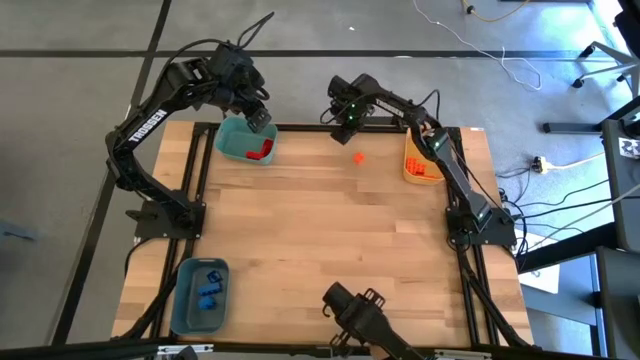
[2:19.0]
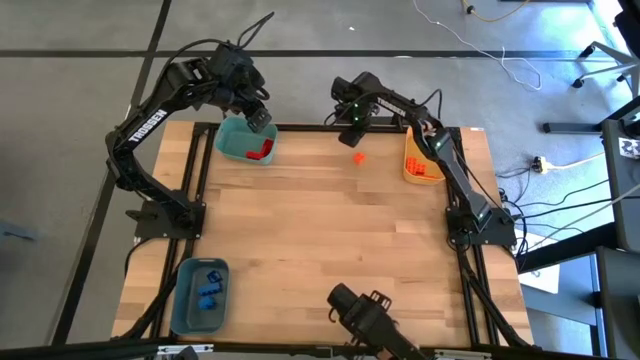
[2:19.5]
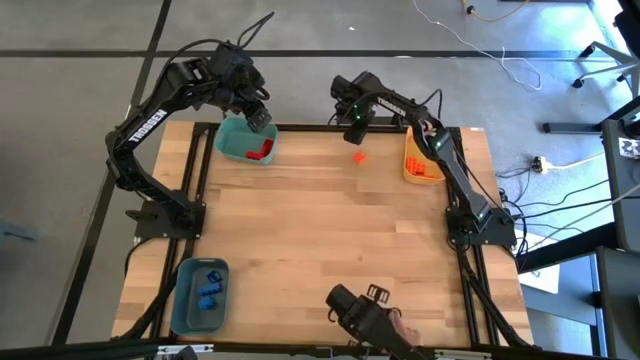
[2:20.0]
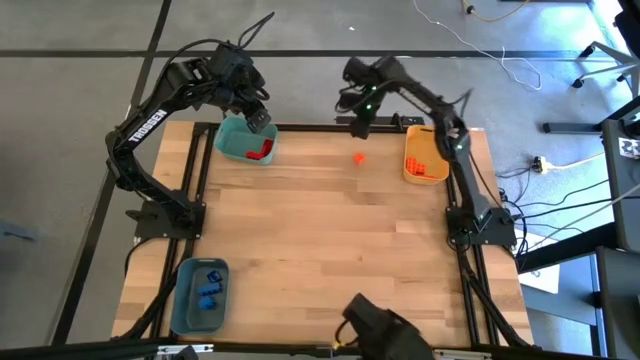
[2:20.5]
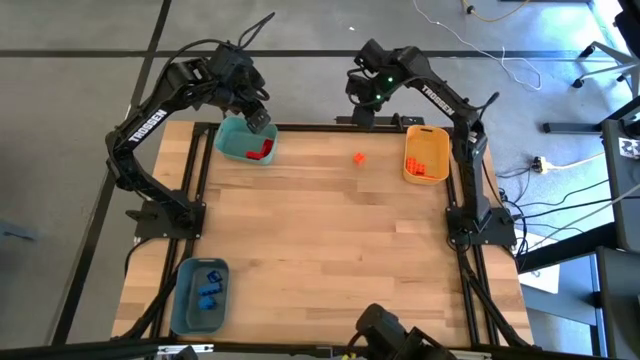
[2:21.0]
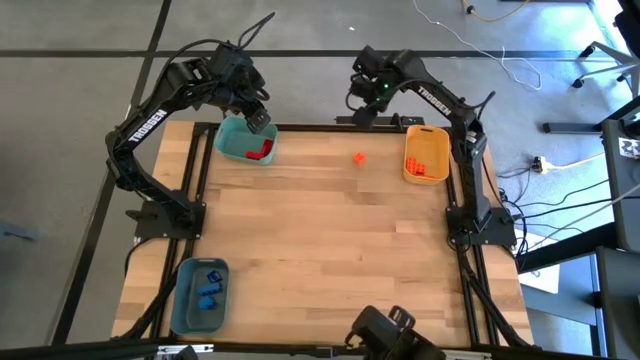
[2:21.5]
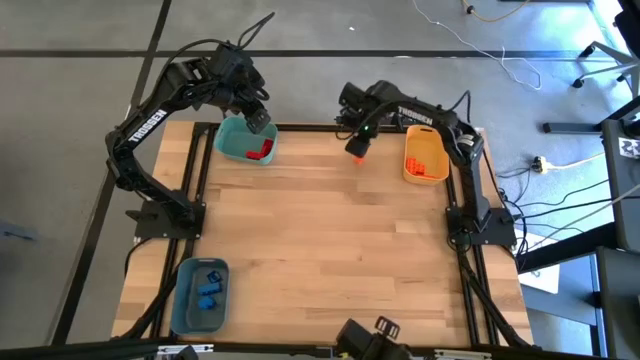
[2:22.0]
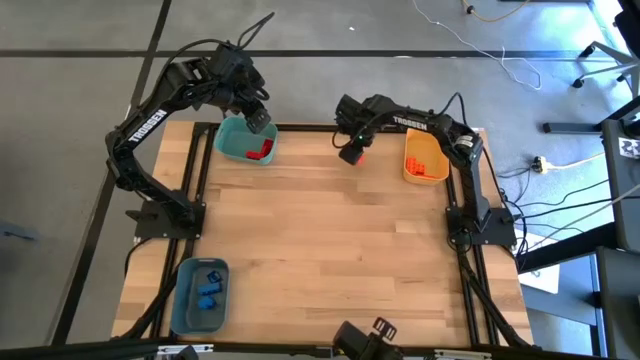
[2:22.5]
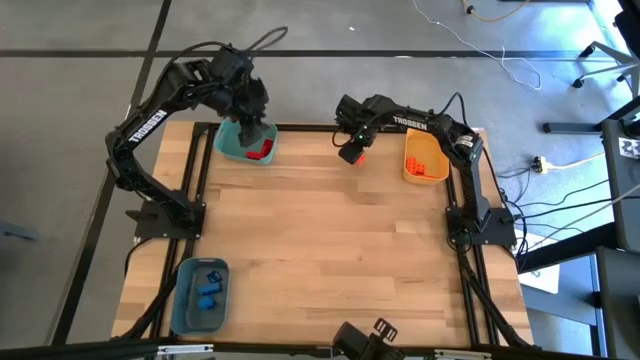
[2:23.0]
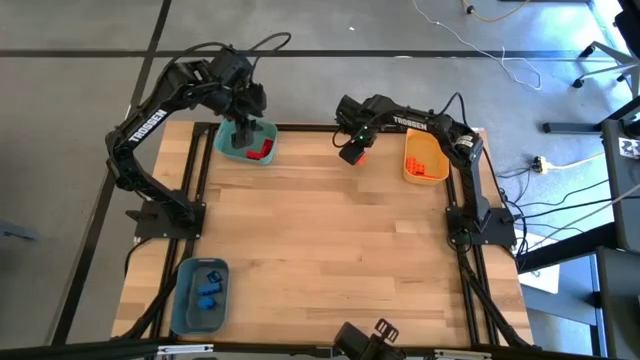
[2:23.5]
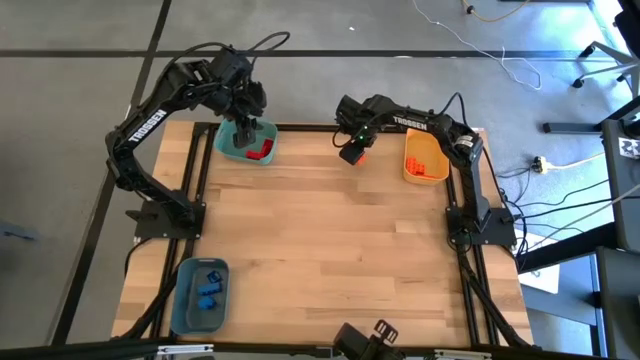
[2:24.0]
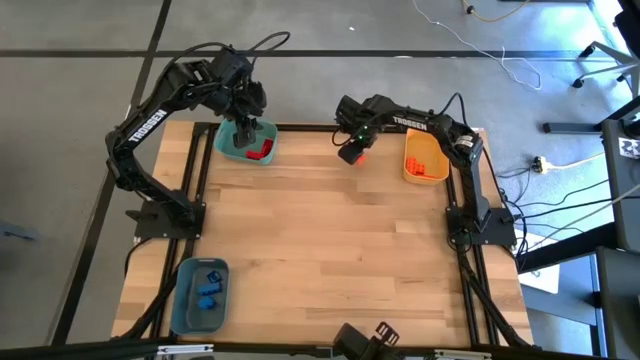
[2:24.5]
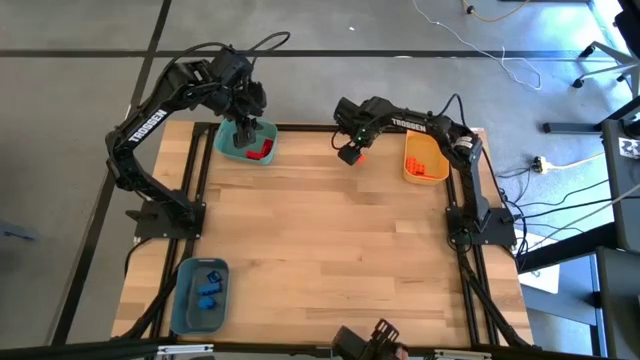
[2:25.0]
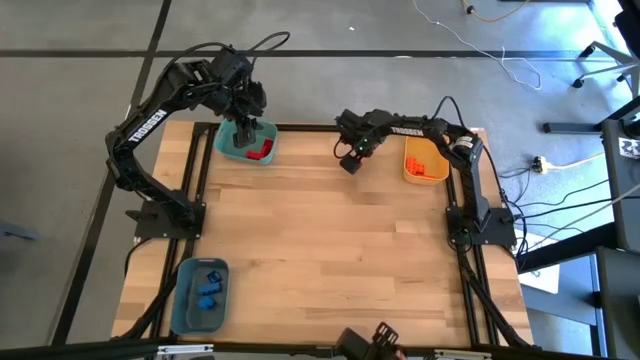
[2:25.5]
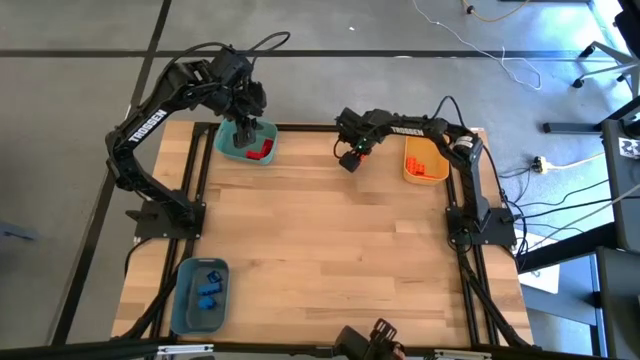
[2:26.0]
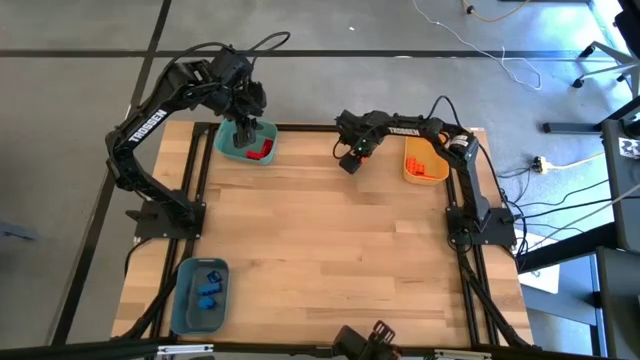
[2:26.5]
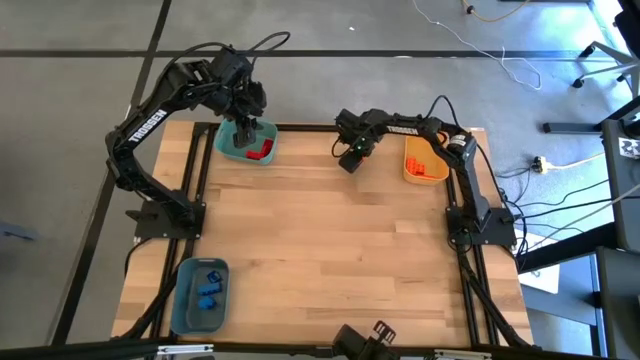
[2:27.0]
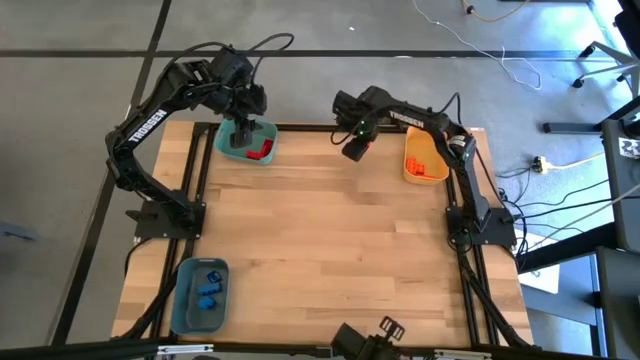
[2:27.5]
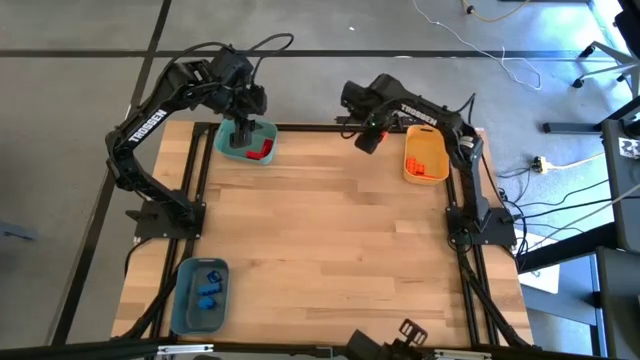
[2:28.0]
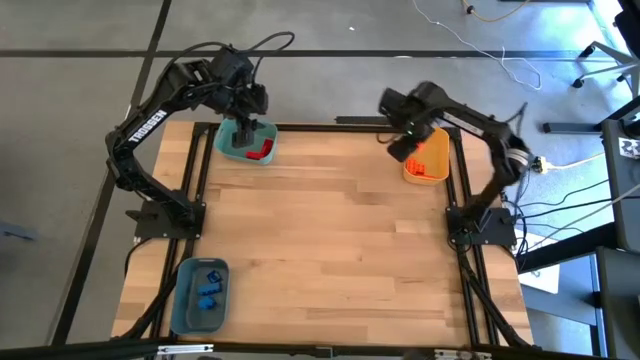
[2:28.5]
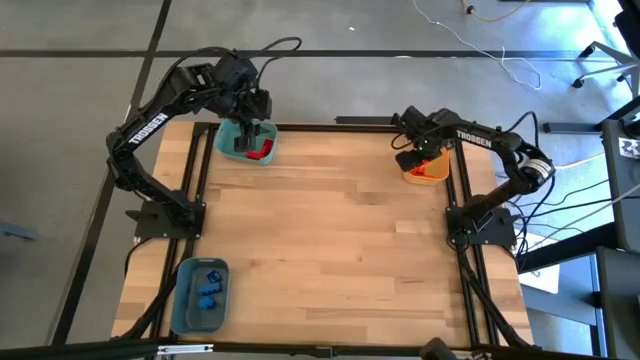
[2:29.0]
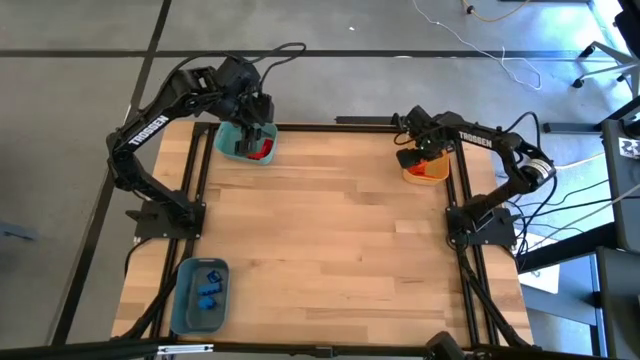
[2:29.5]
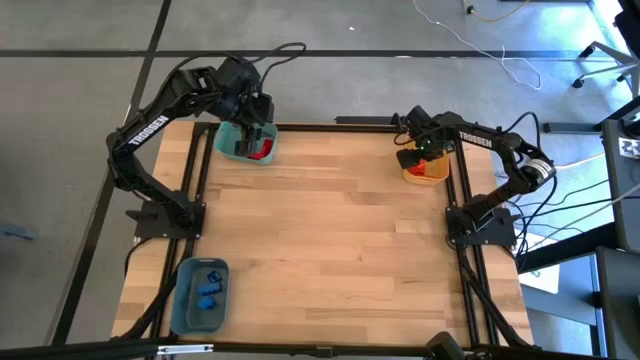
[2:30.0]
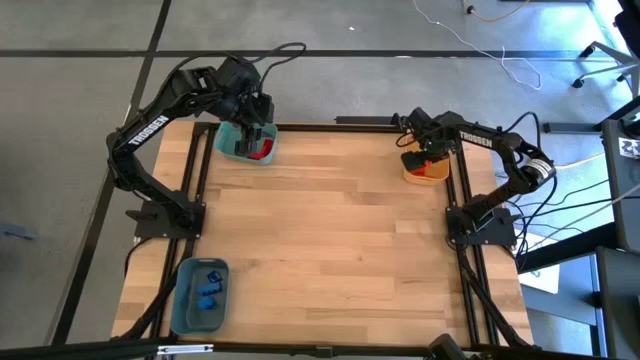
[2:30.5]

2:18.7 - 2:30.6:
Task: Sort & place blocks by color
Put the orange game piece into the yellow bin

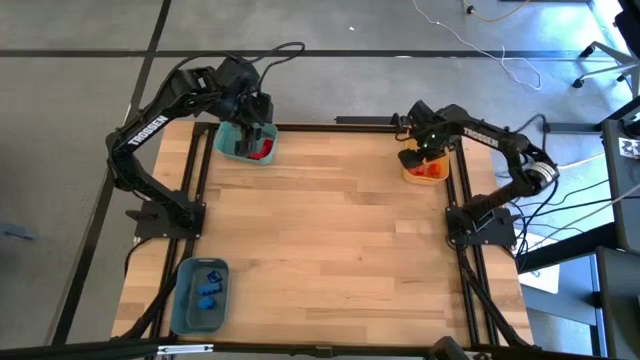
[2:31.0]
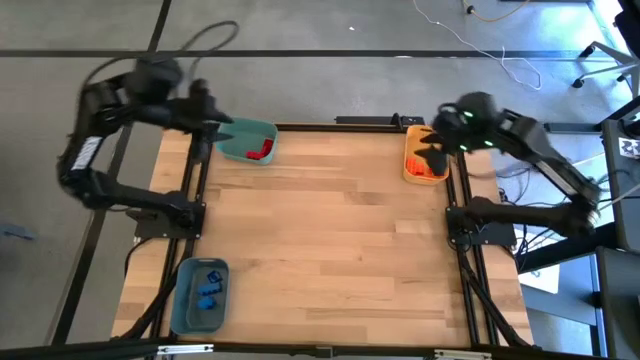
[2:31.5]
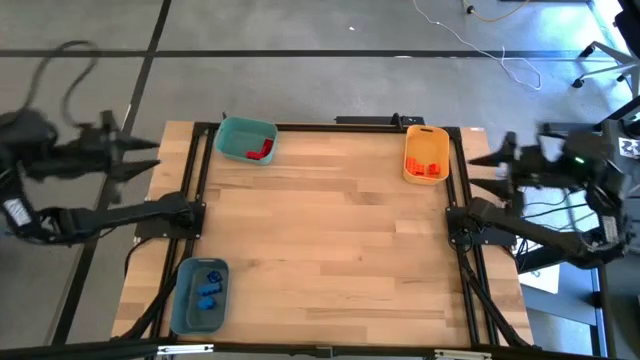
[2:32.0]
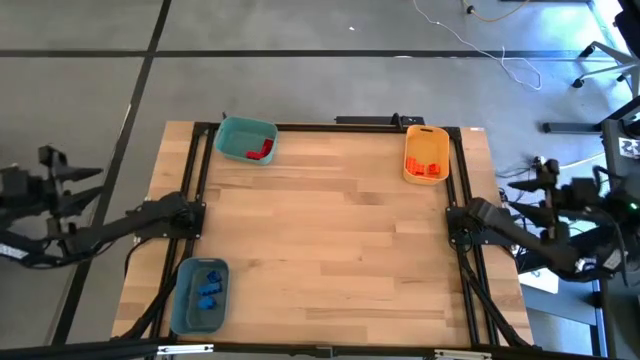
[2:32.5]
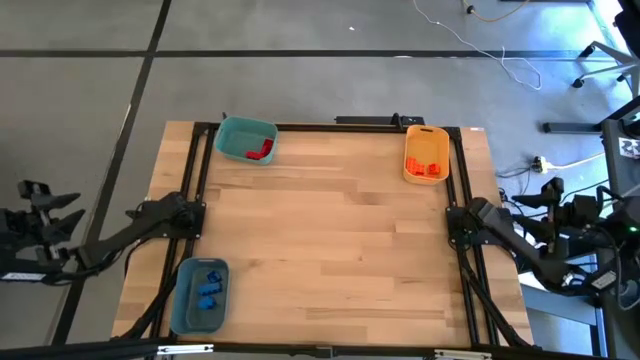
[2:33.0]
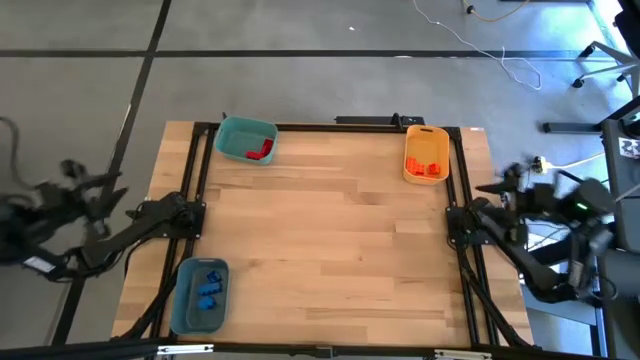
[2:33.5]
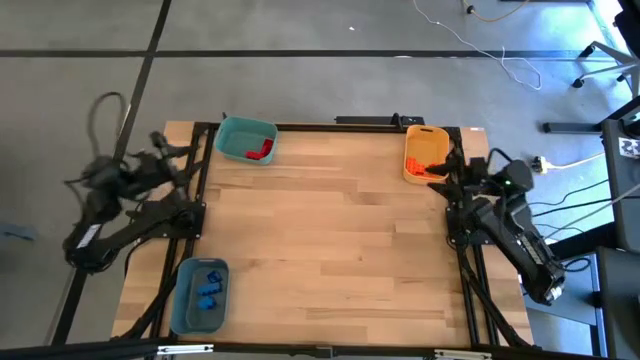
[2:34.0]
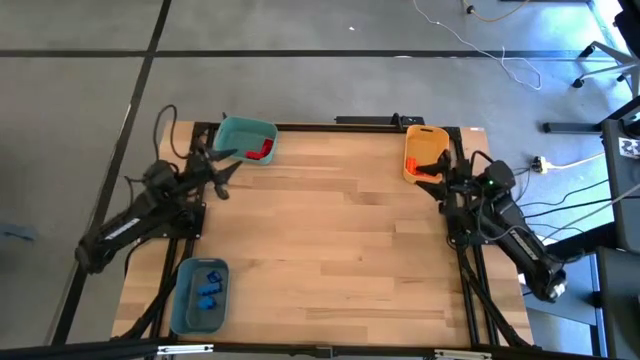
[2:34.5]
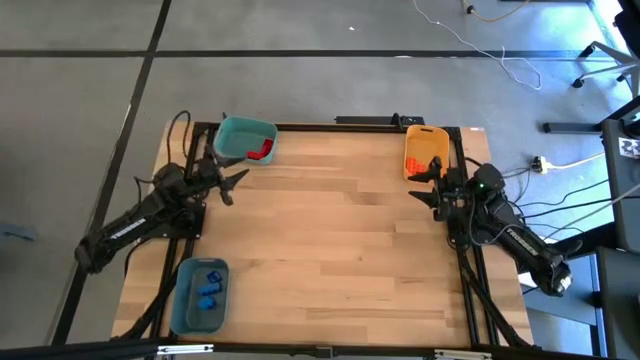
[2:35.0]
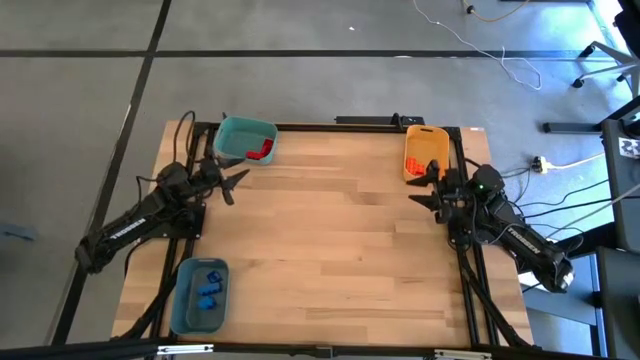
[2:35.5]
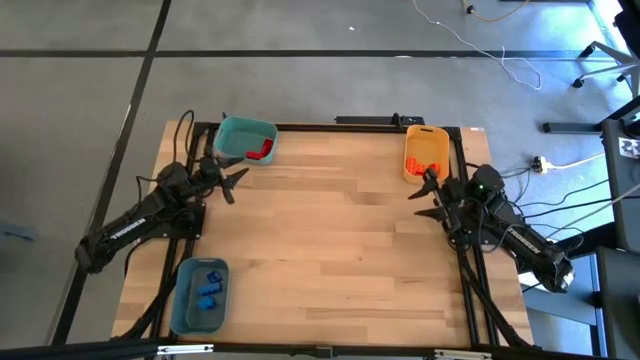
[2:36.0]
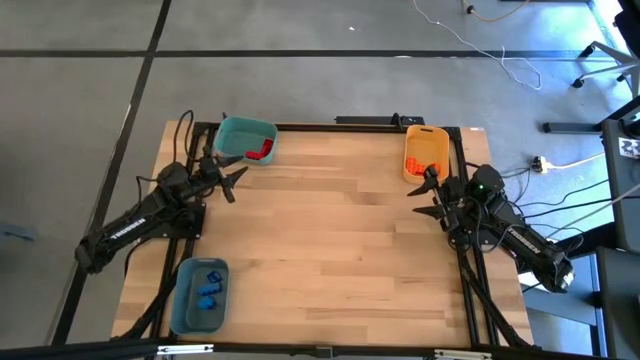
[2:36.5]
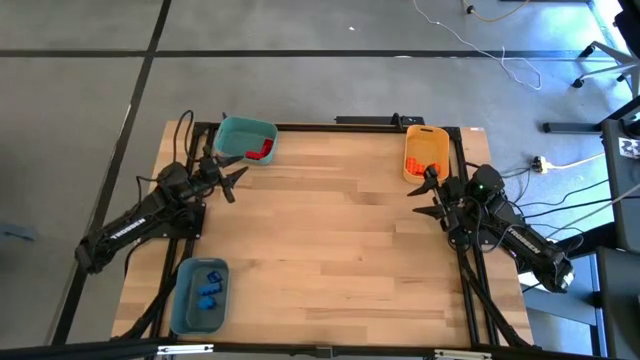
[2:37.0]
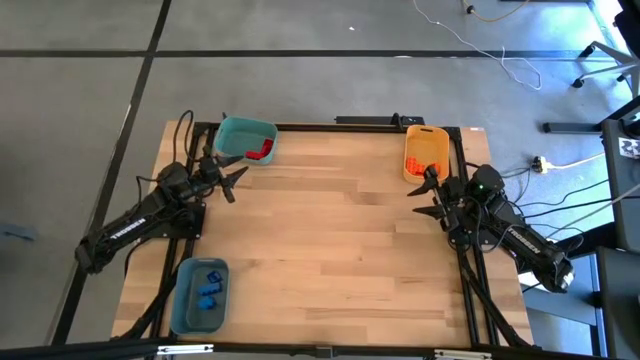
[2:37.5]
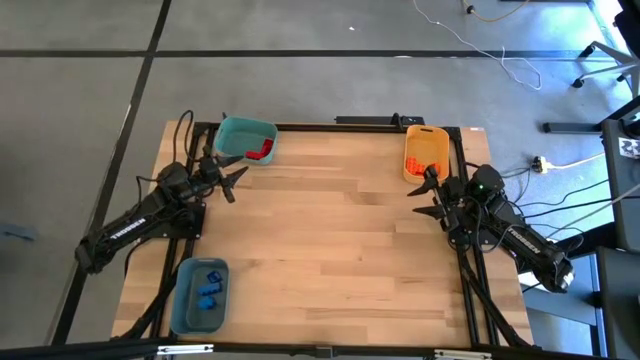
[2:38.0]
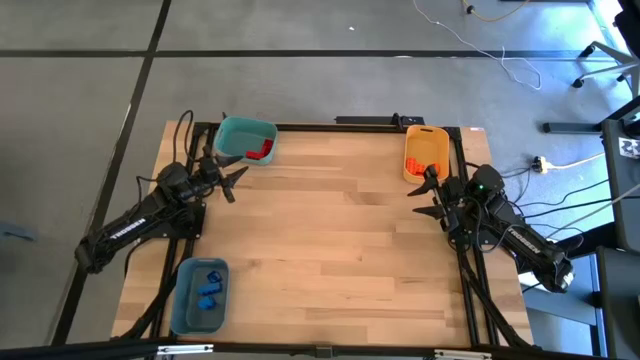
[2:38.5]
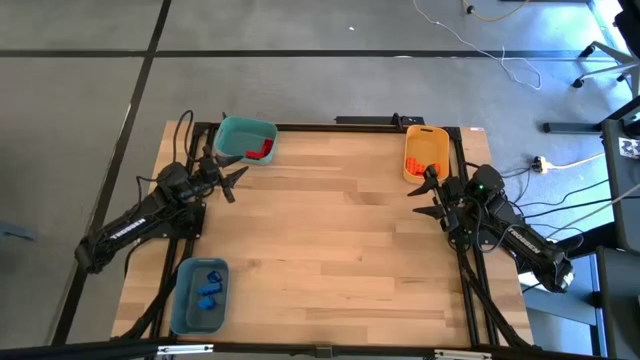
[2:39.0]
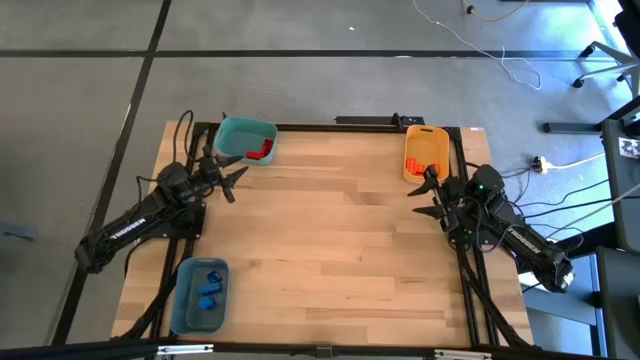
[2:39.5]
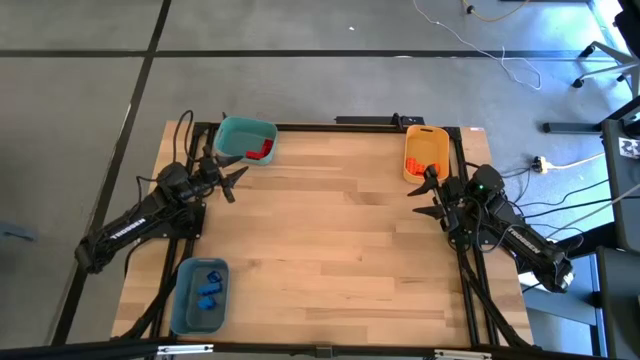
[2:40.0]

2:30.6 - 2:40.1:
Return to Home Position

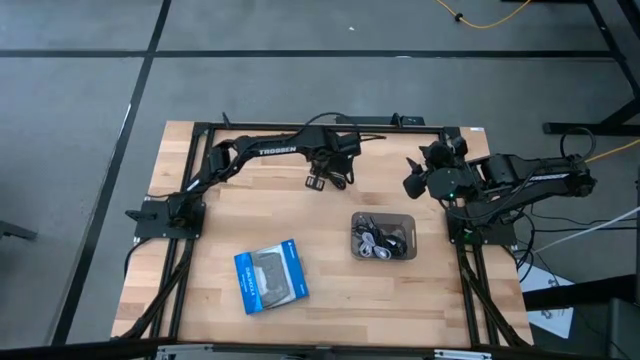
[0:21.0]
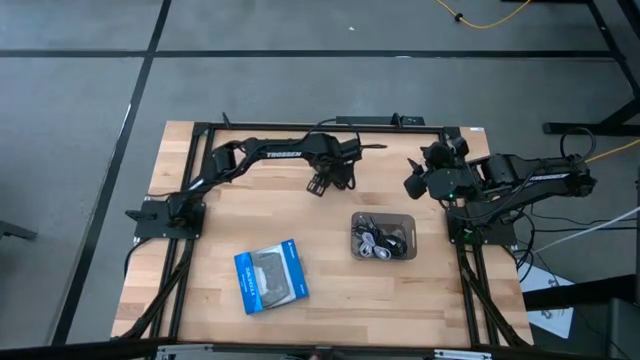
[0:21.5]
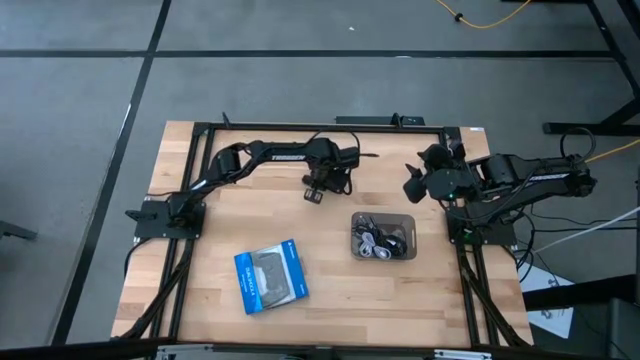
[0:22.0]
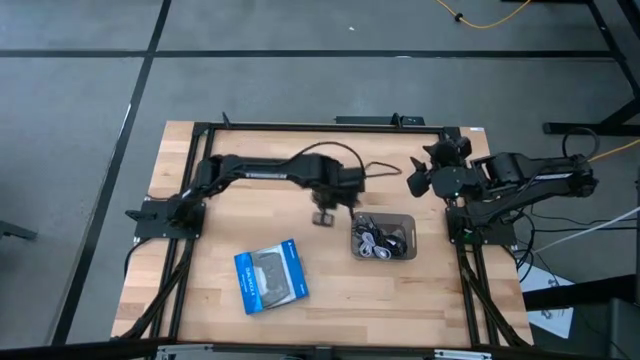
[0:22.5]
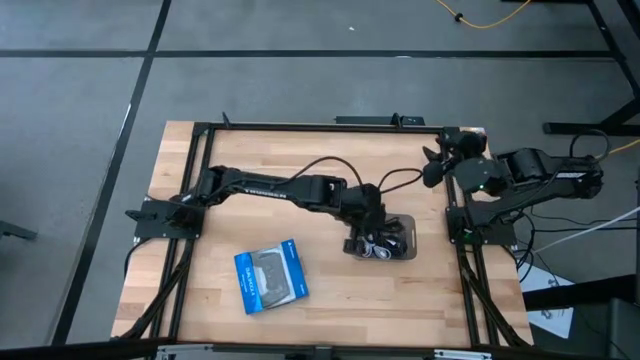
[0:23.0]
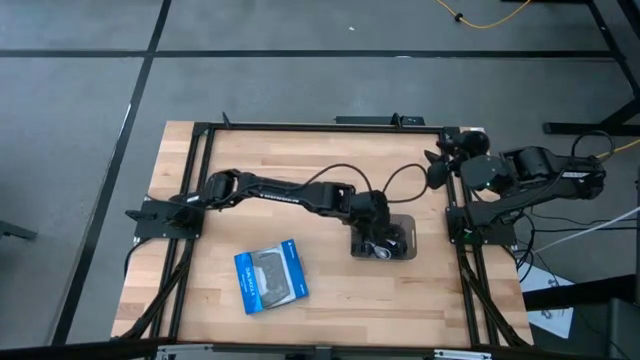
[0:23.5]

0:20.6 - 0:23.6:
Task: Pick and place USB-C Cables
Put the black charger cable into the black bin
